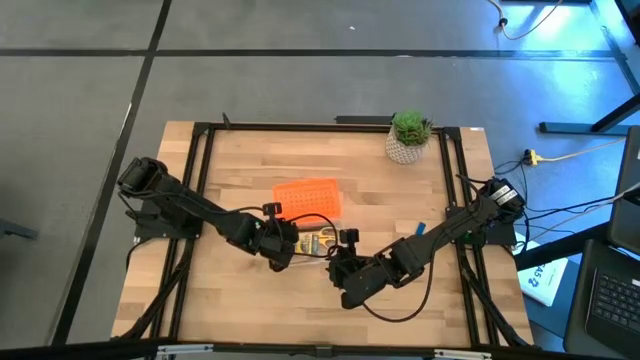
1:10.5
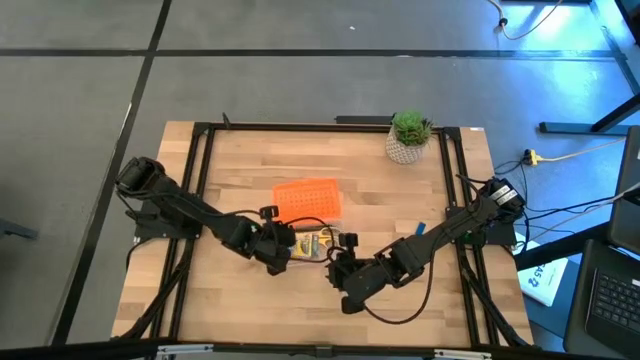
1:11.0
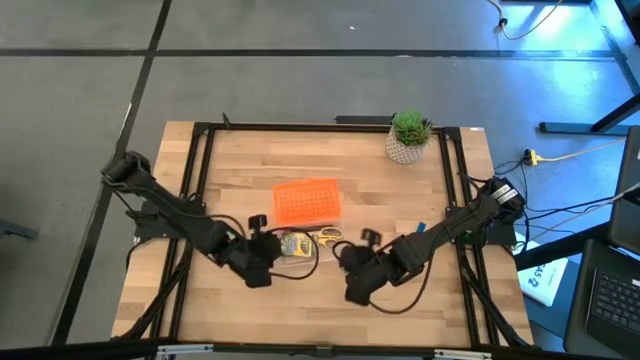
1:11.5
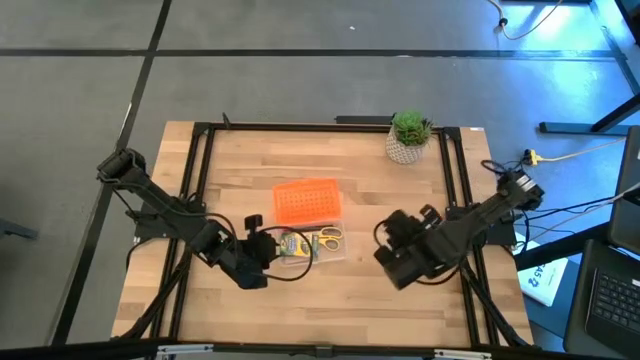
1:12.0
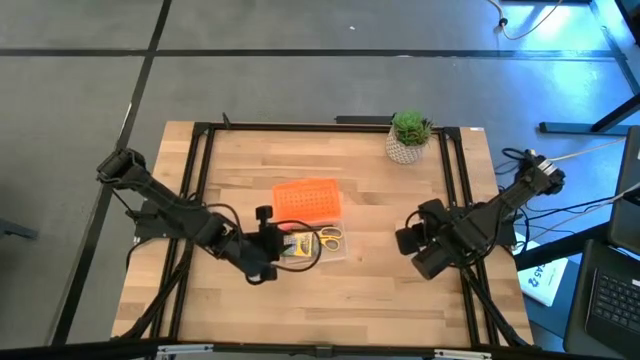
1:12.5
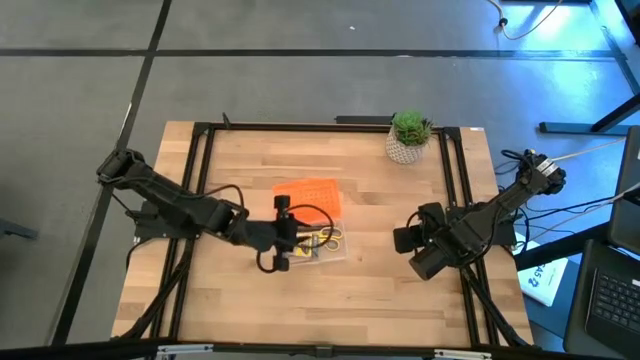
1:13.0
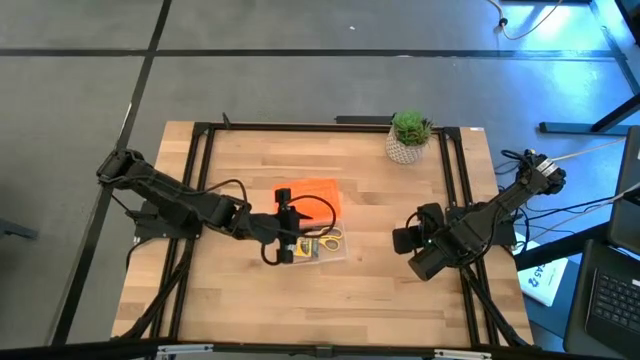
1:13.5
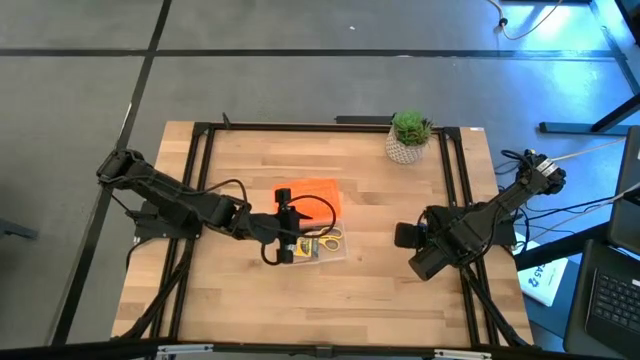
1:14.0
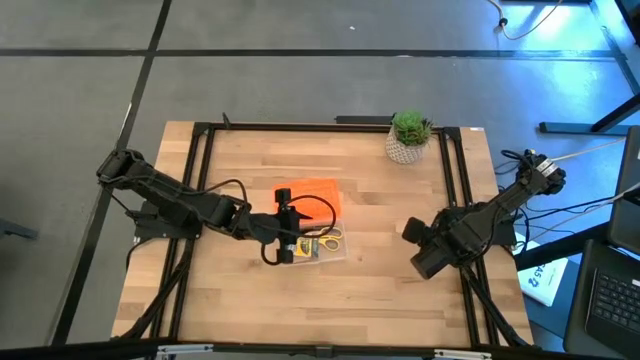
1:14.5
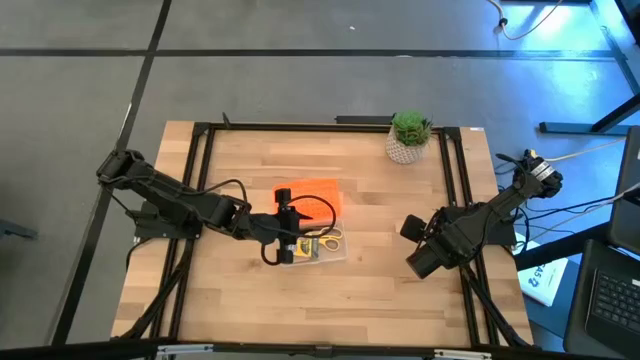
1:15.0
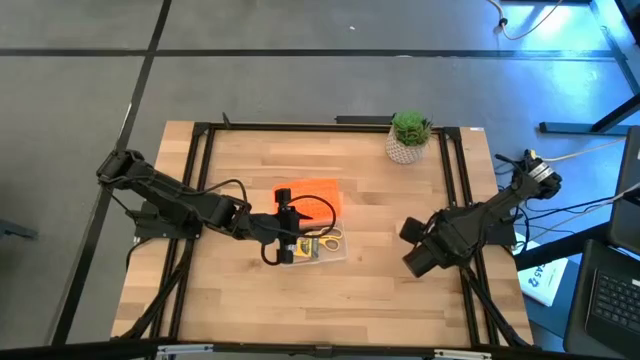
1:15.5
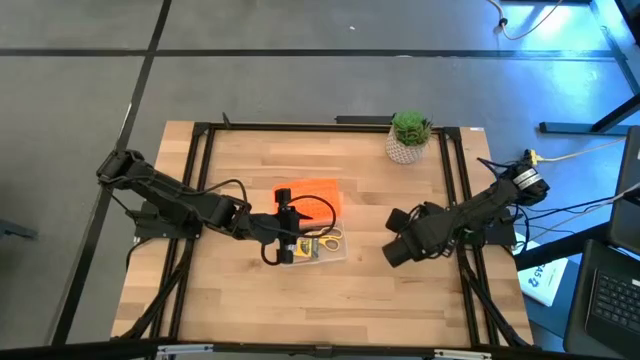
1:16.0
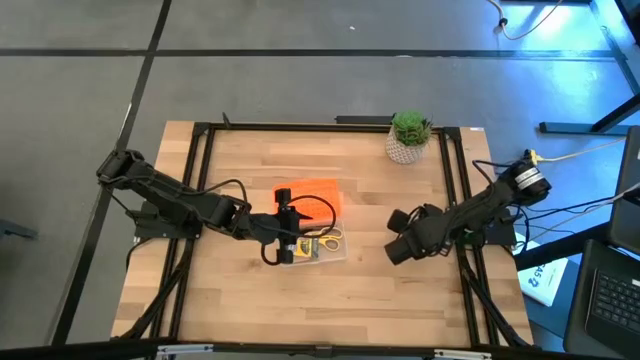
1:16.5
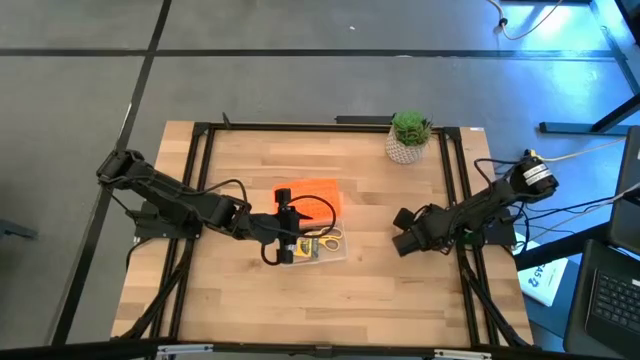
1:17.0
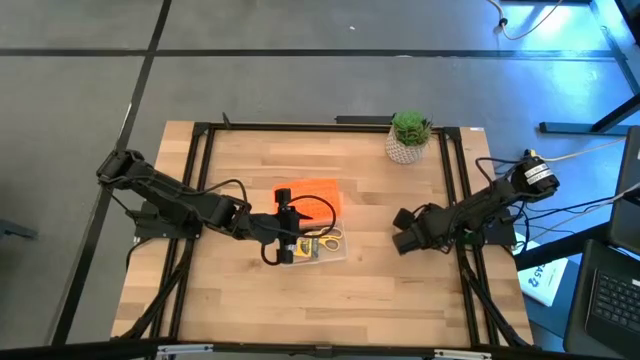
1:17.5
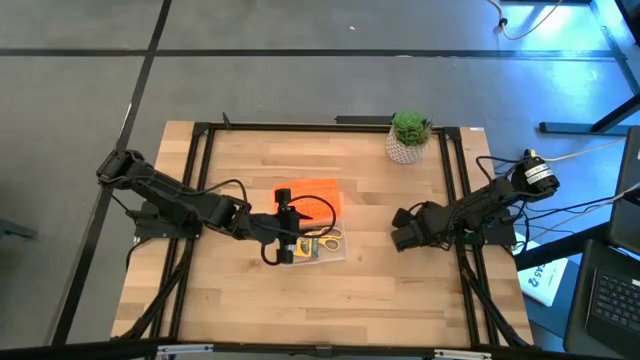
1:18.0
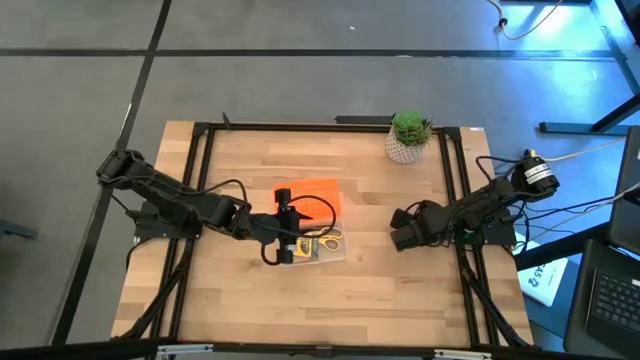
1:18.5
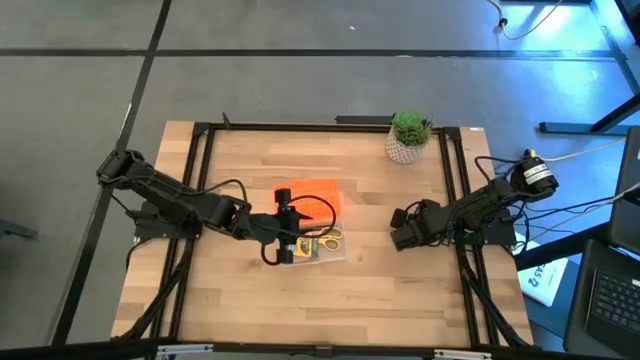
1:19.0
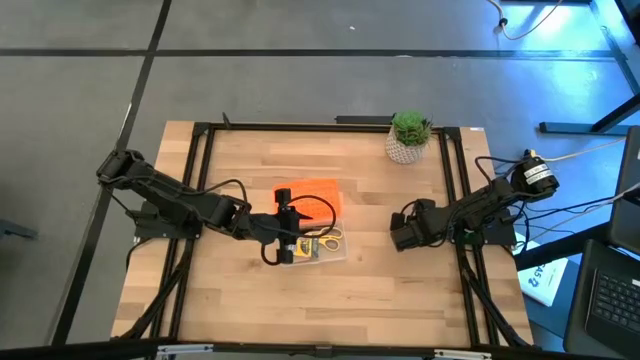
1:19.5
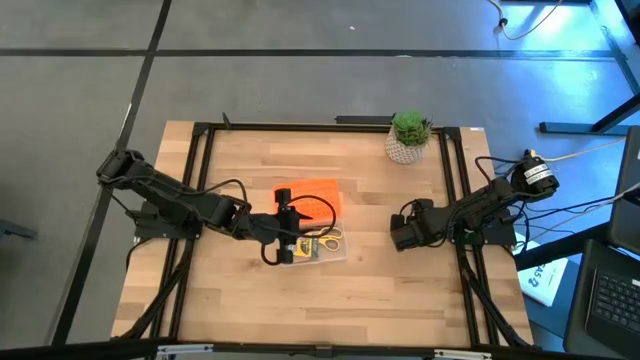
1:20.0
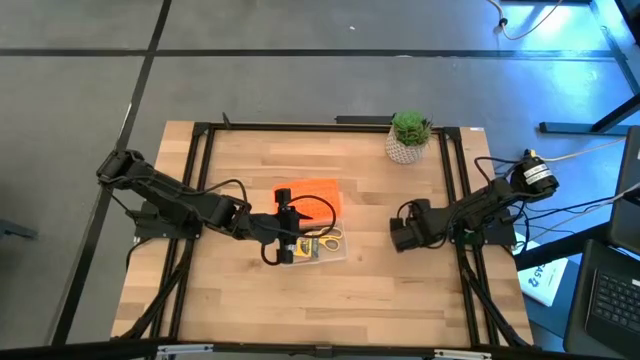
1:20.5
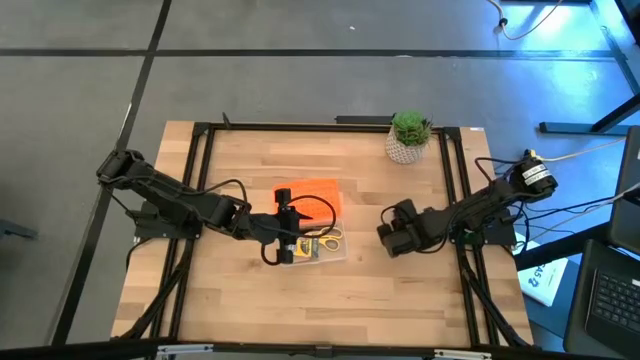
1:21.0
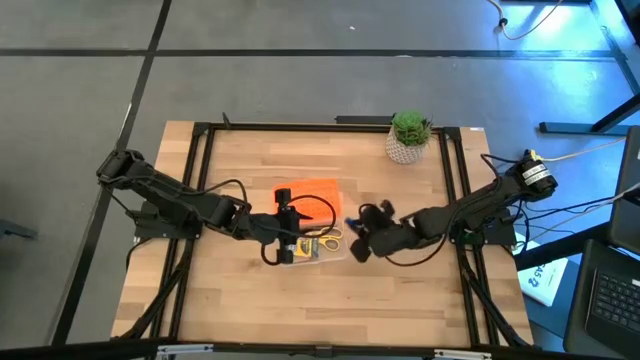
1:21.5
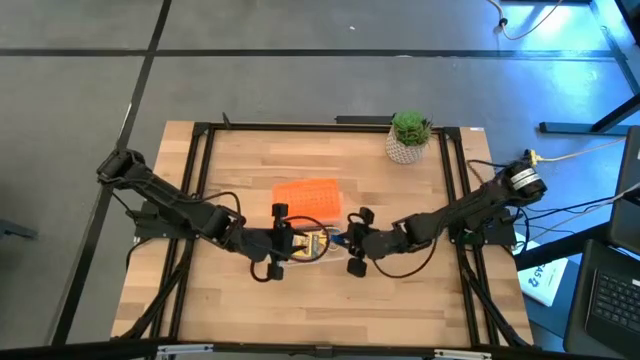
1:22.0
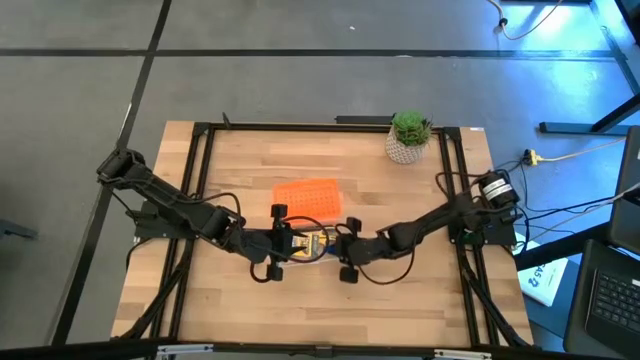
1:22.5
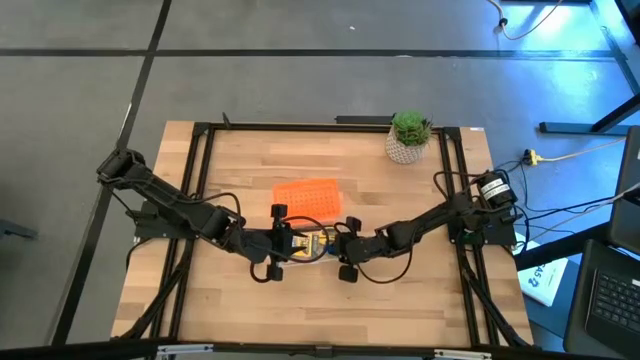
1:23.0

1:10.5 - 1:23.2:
Task: Pack school essentials
Put the blue eraser into the supply box

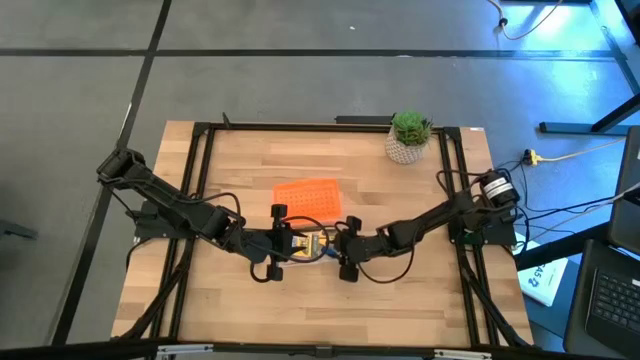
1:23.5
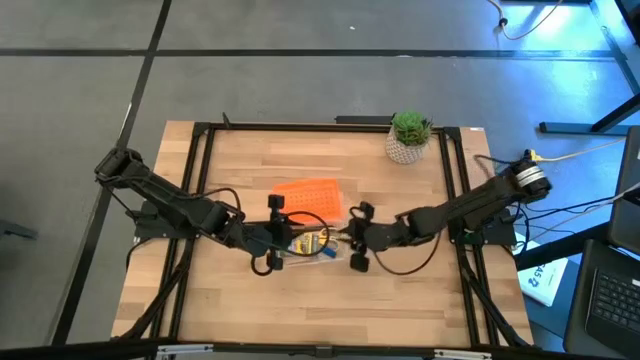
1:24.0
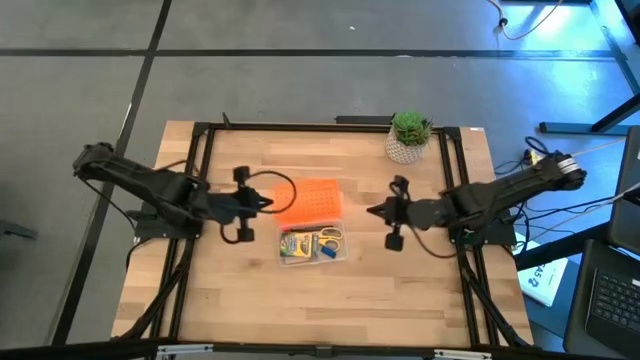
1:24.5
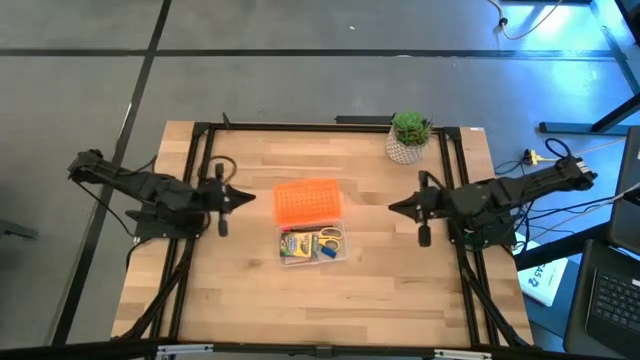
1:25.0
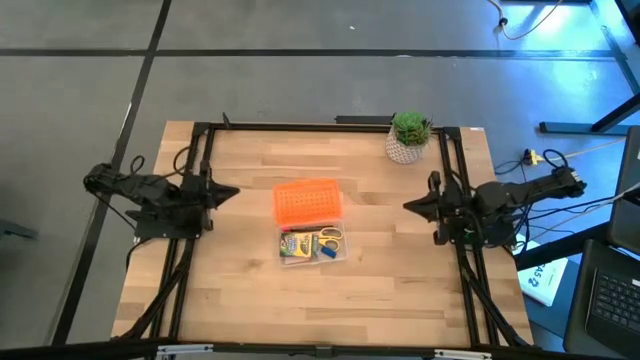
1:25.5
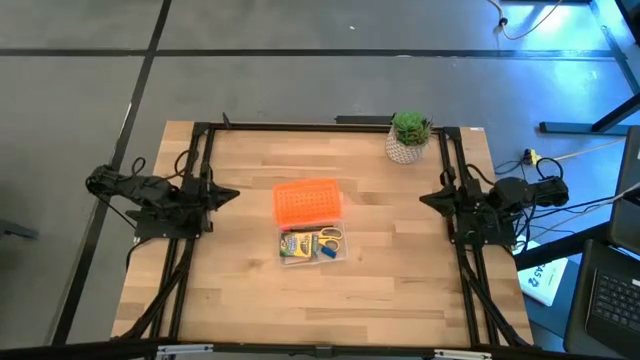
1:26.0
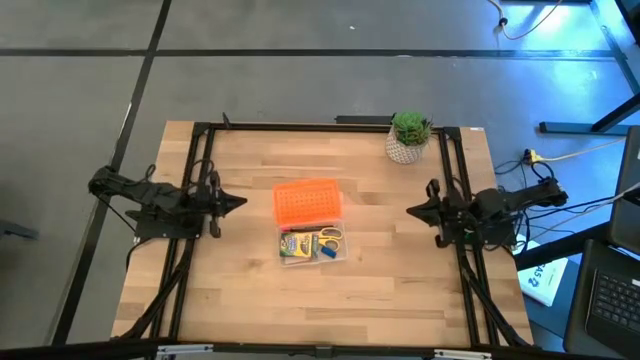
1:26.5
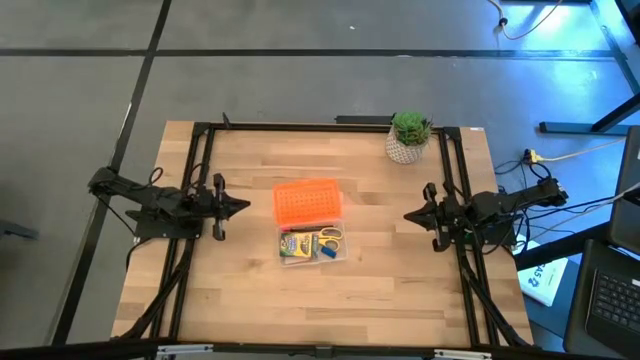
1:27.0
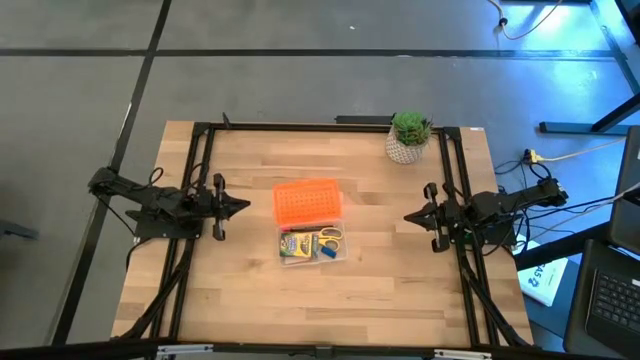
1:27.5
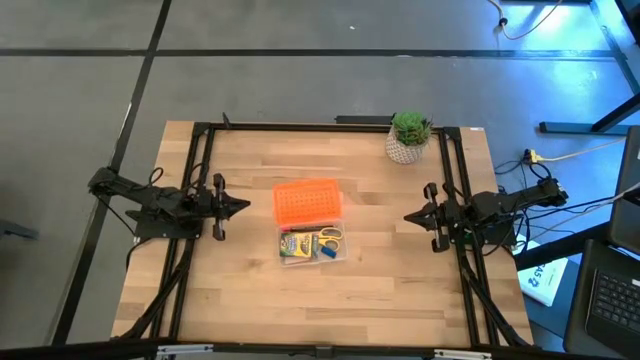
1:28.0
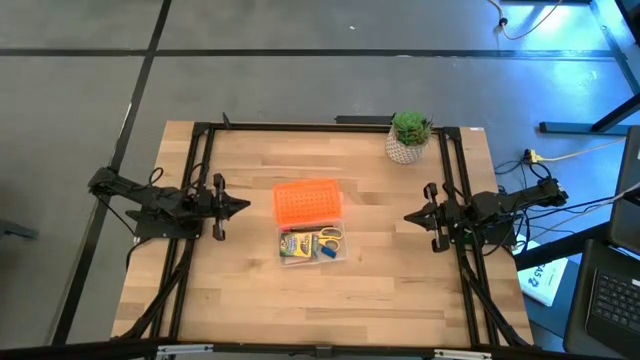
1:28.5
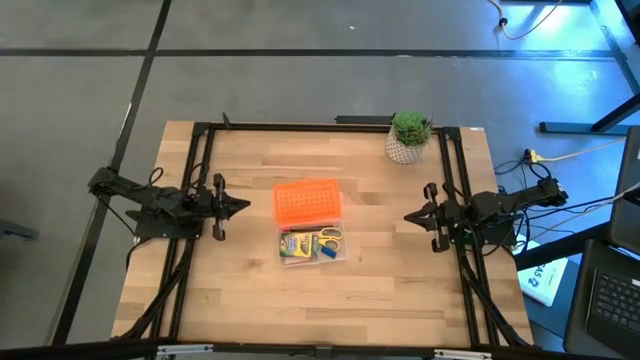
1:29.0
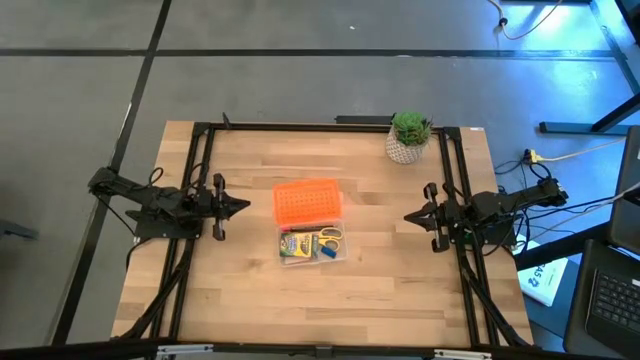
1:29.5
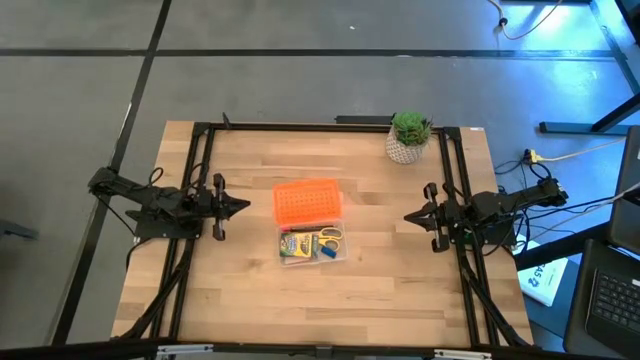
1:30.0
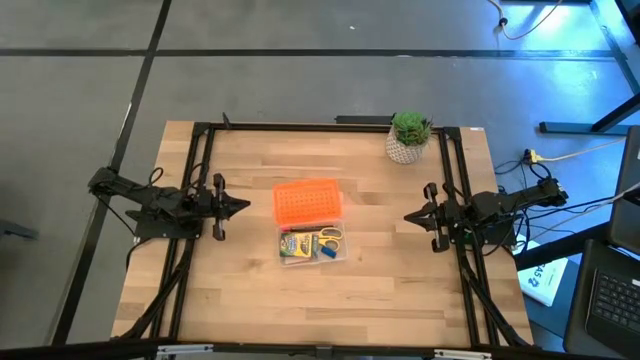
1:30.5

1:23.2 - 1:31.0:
Return to Home Position

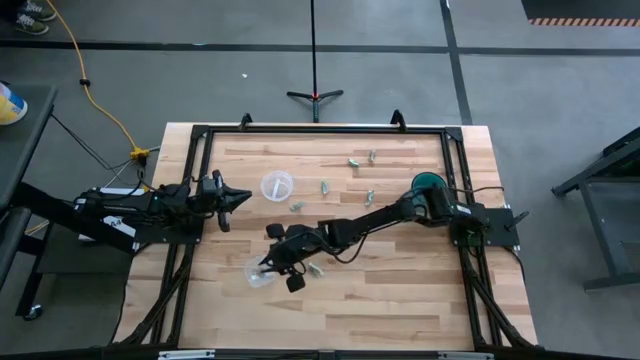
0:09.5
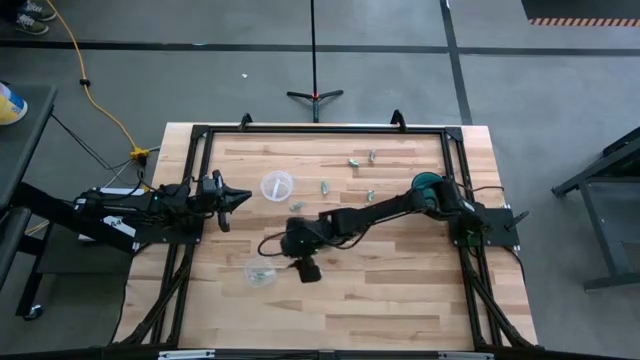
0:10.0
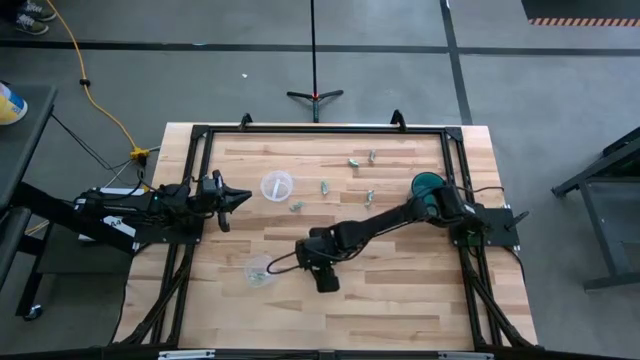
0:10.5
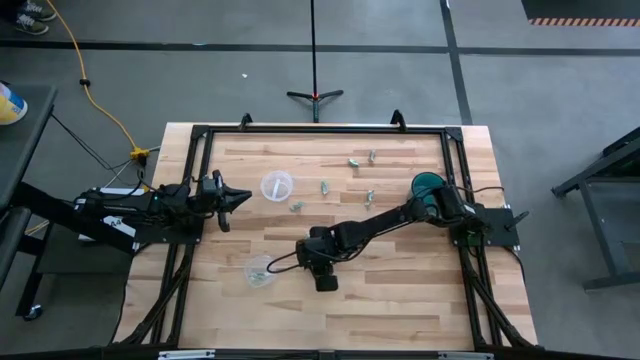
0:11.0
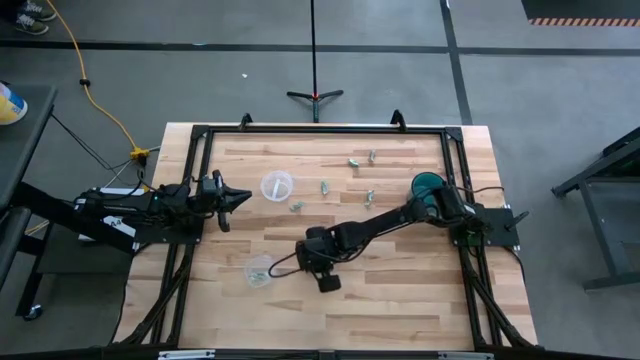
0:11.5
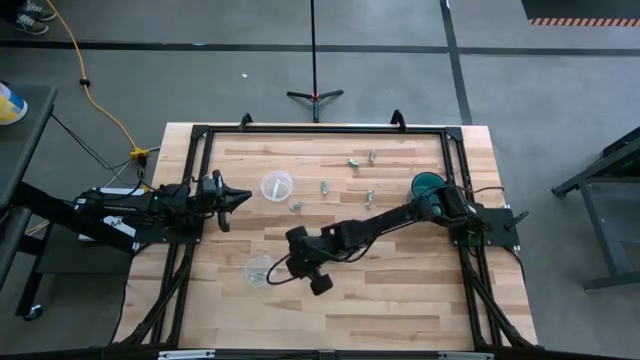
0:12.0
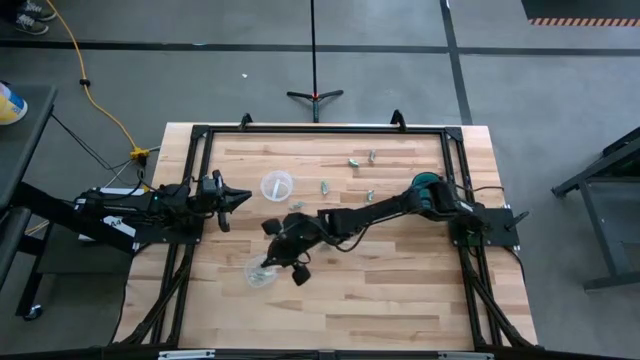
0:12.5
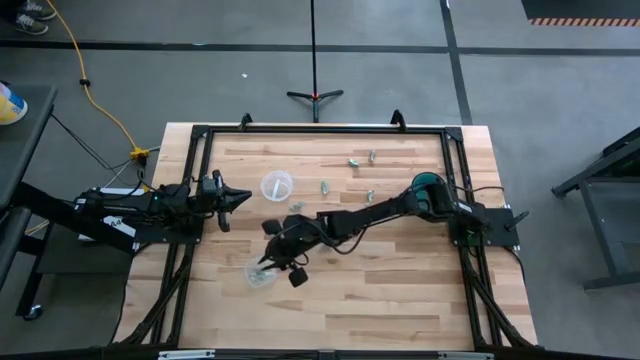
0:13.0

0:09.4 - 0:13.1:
Task: Pick and place items into bin
Put the white stevia packet into the bottom transparent bin
